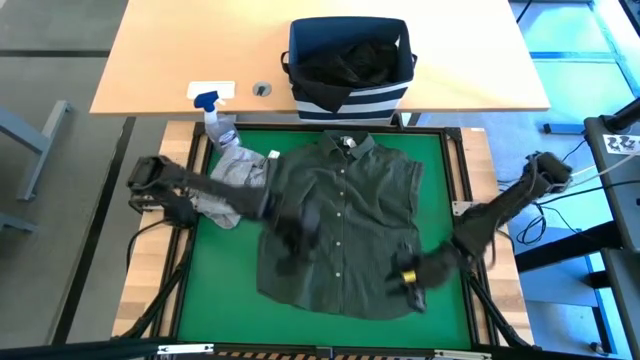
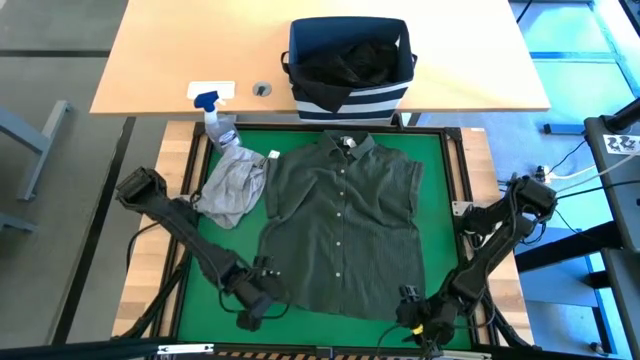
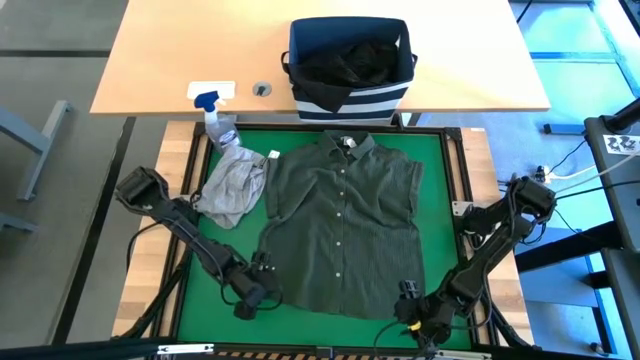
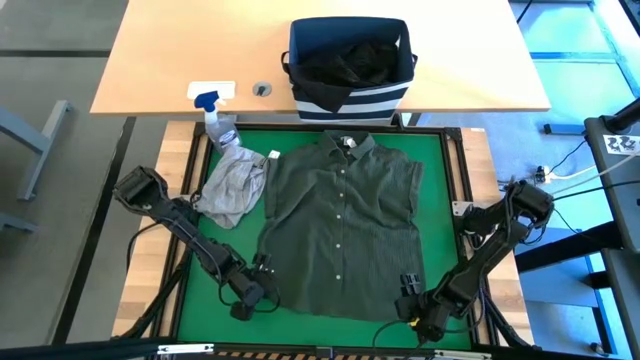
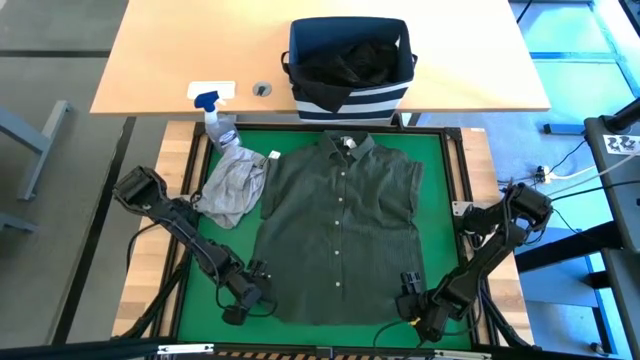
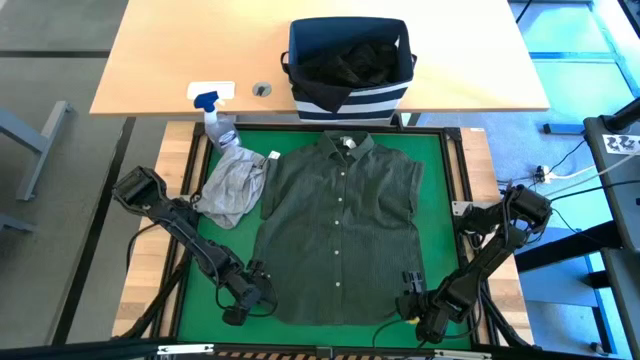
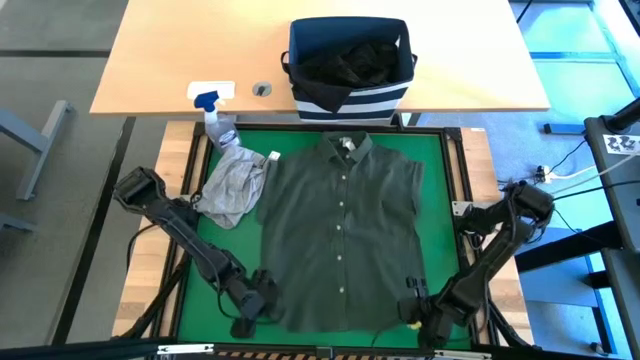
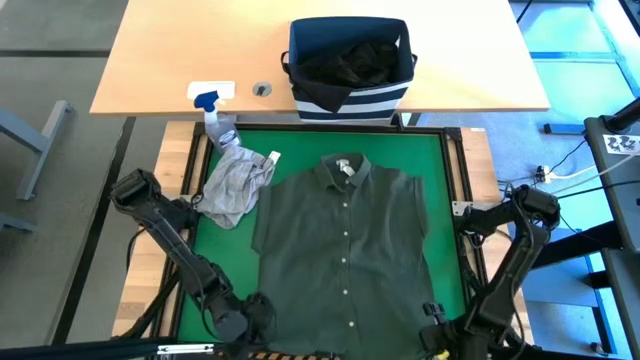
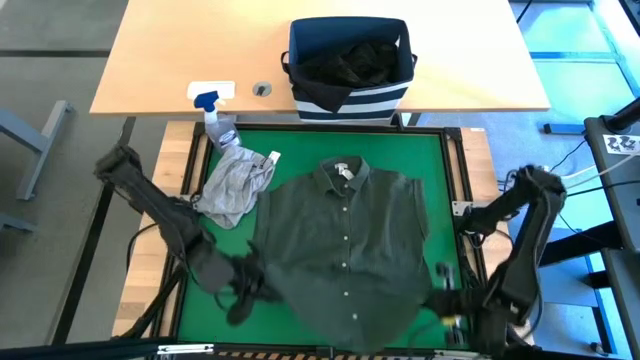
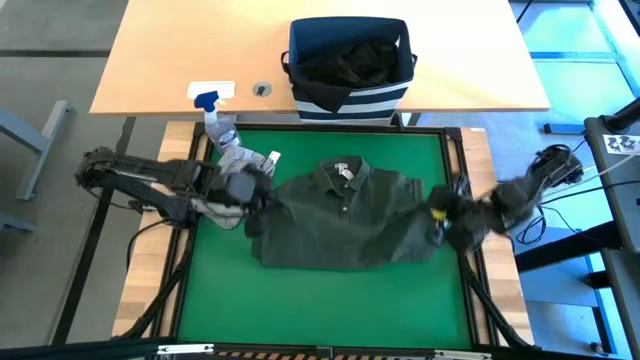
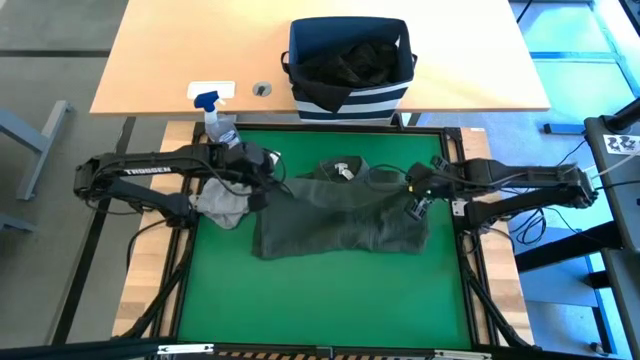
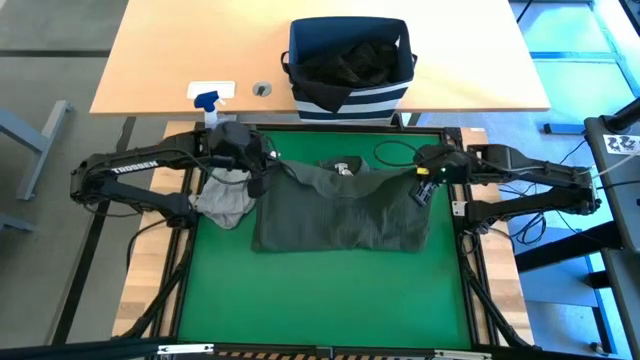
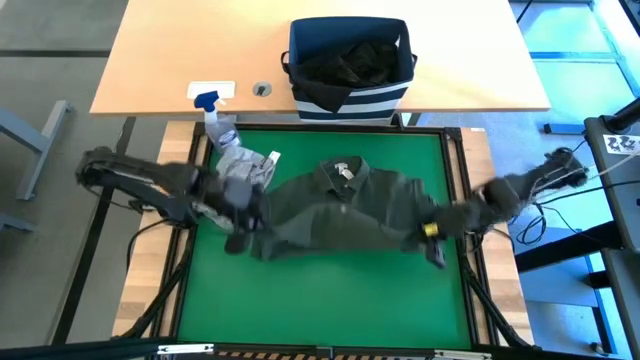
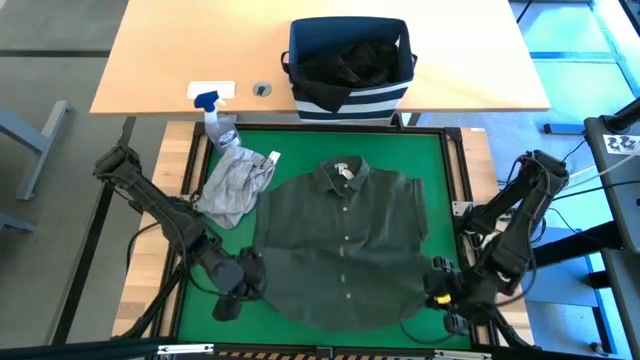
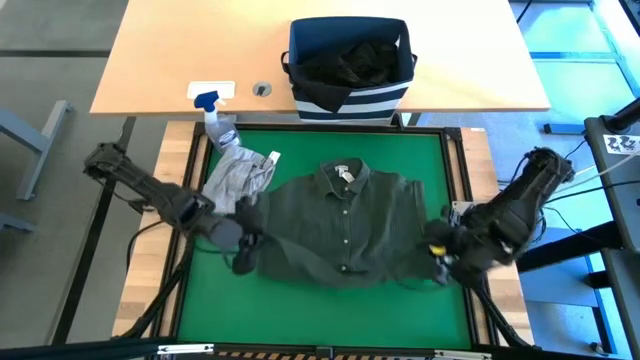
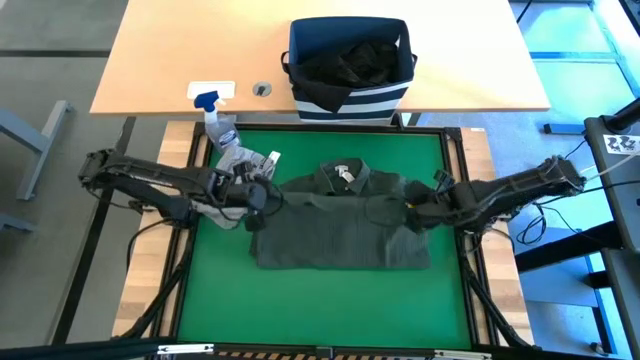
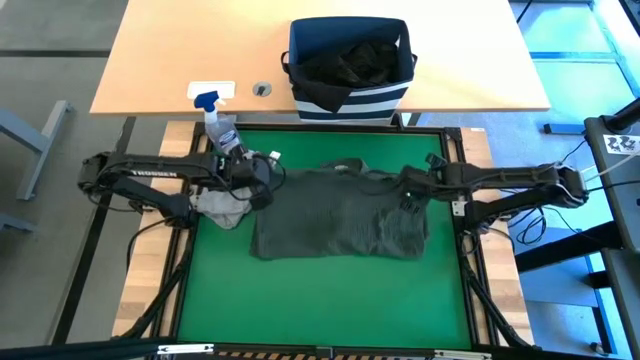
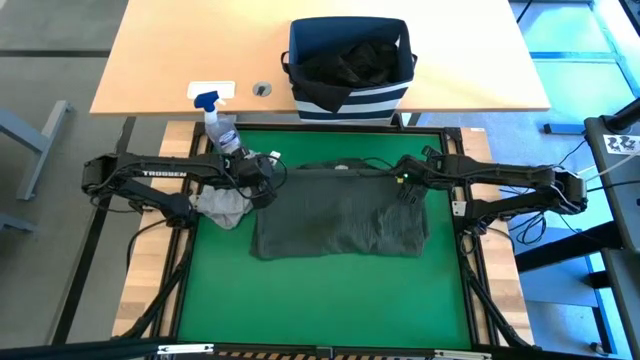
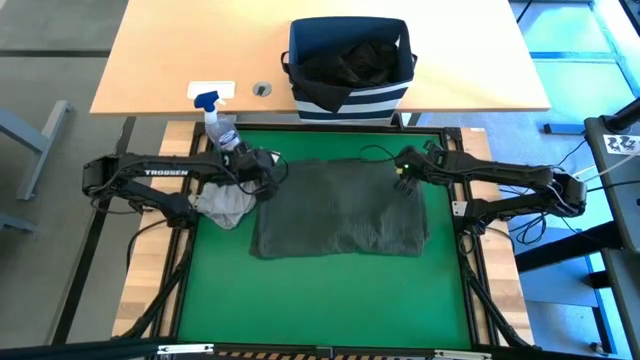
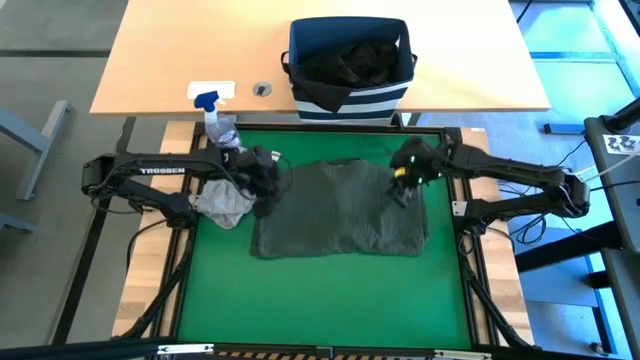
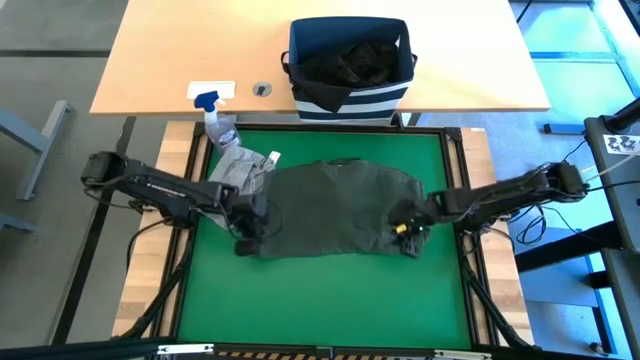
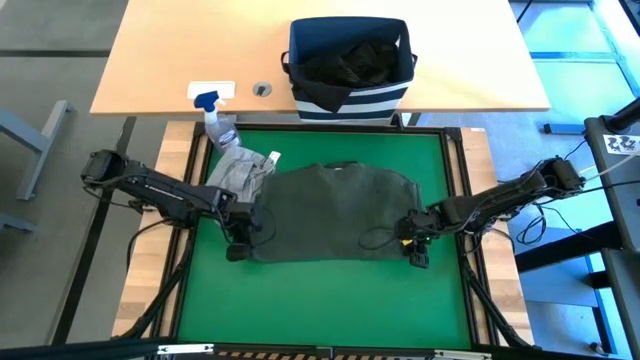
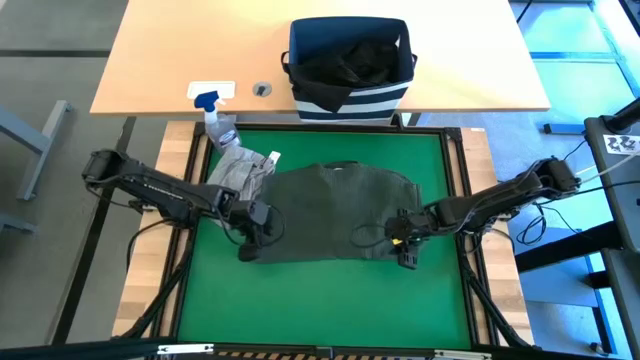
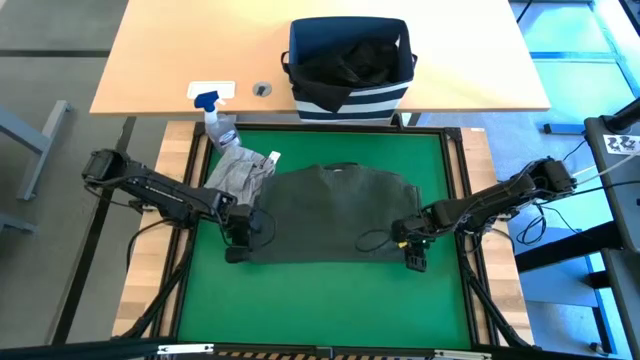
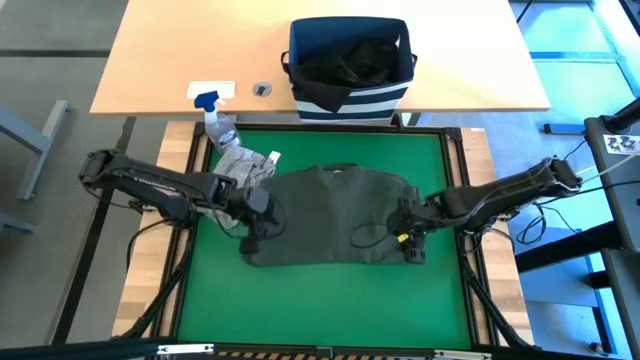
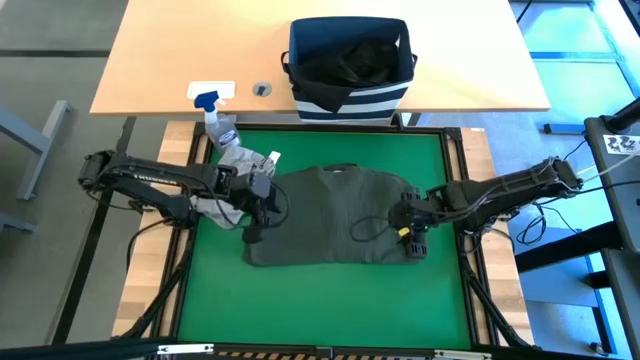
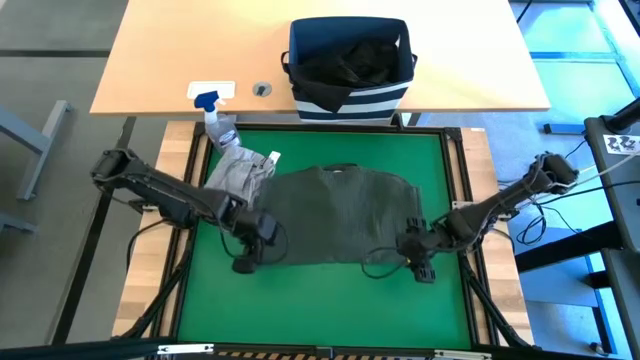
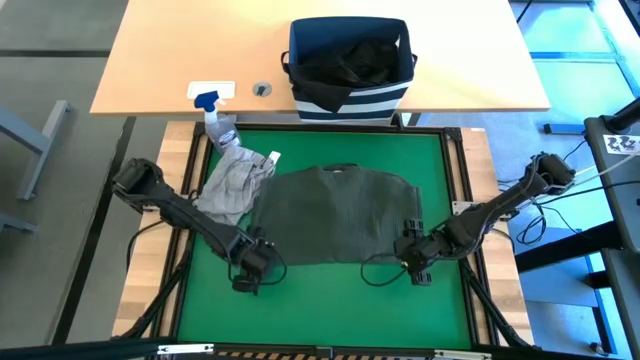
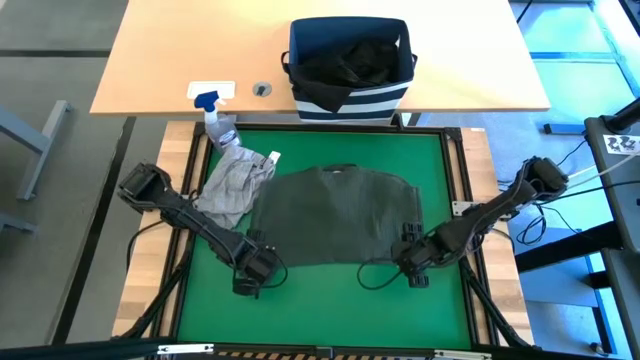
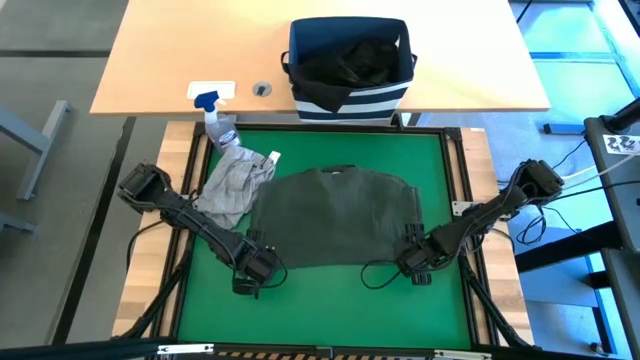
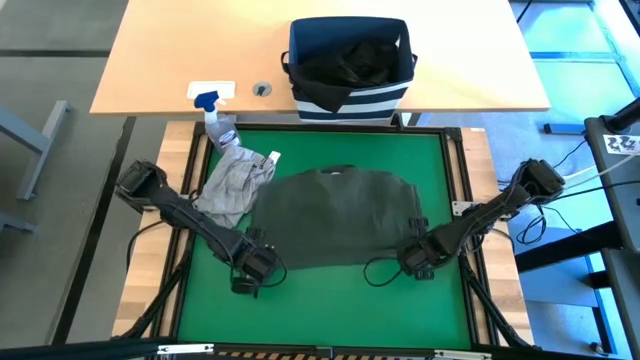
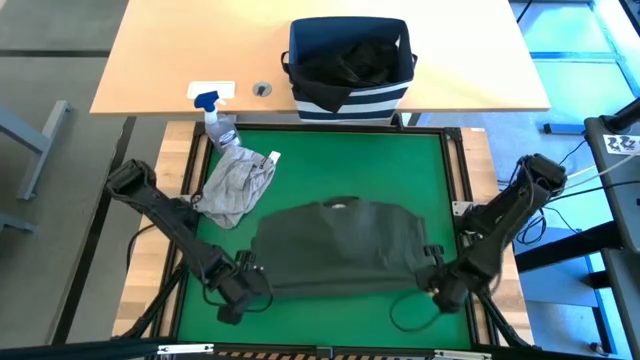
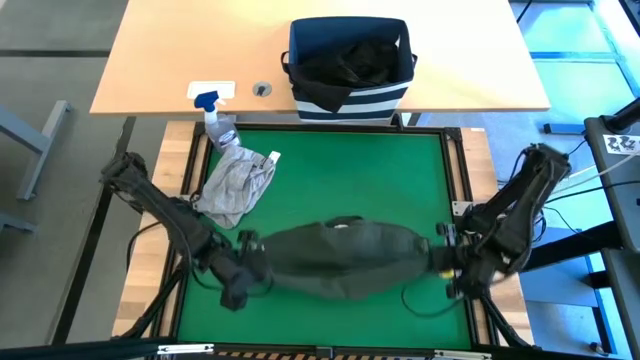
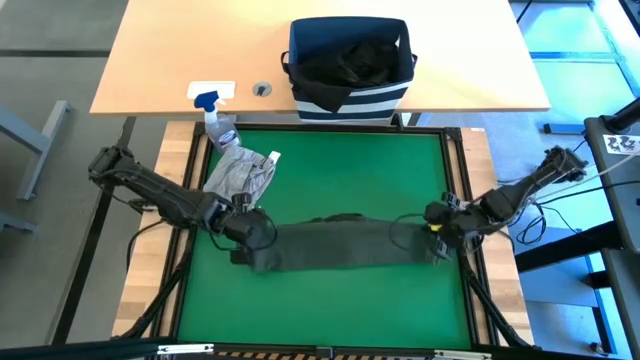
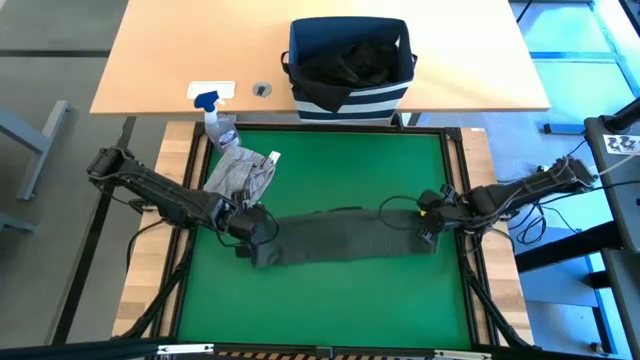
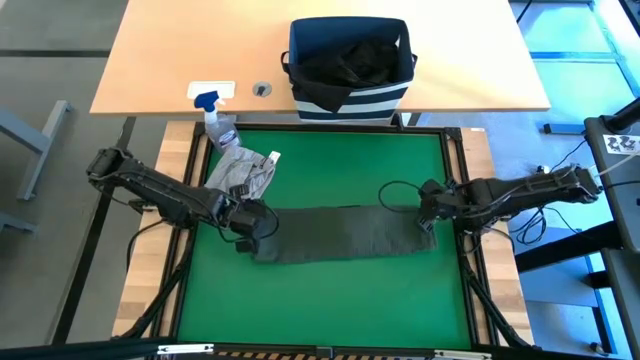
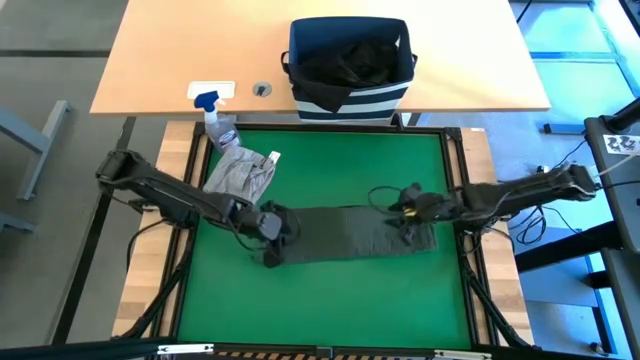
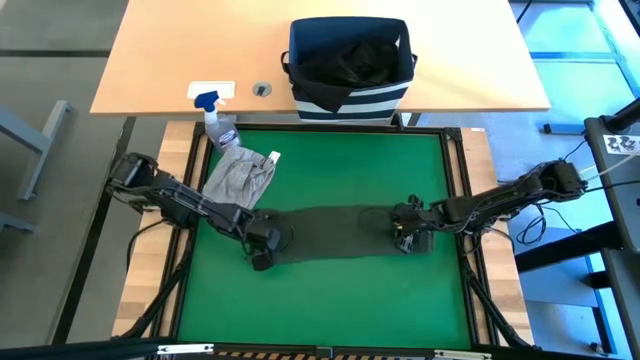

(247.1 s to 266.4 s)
Task: Fold Laundry from Bin
Fold the green shirt

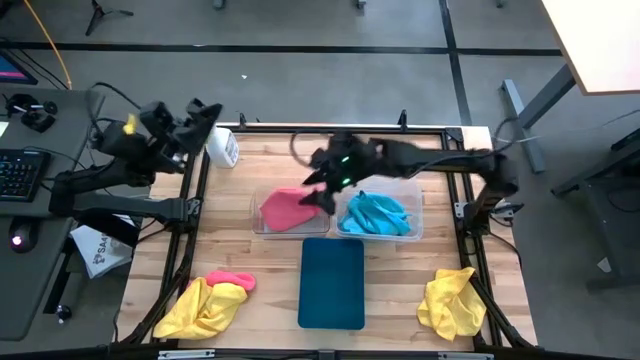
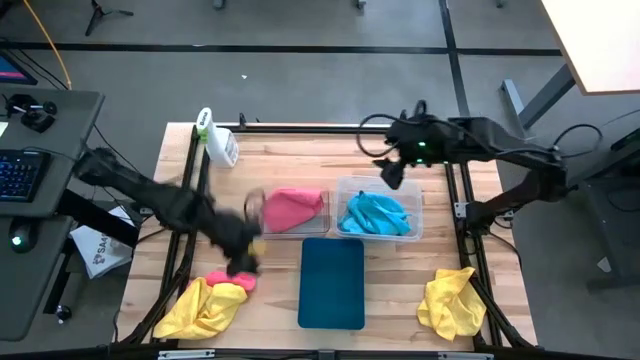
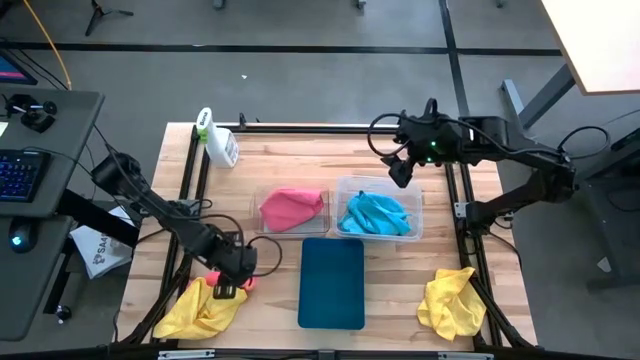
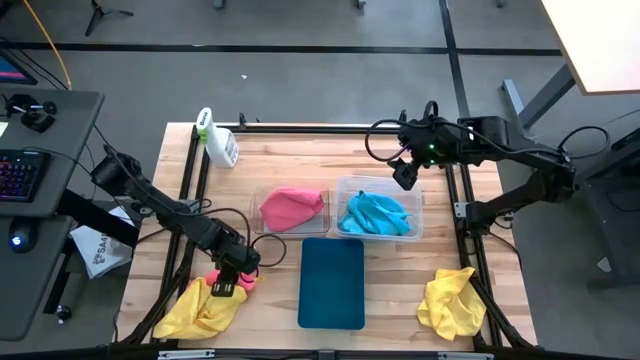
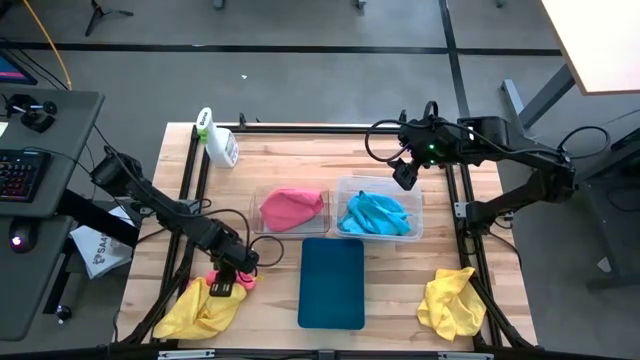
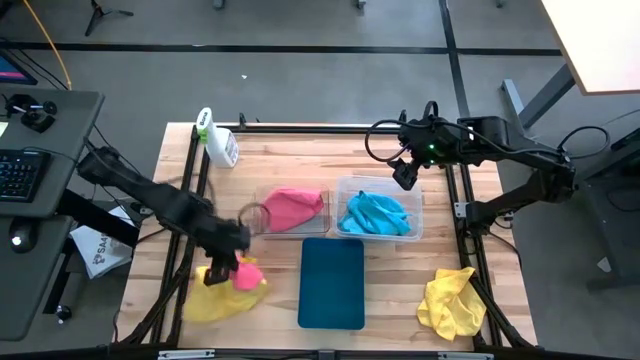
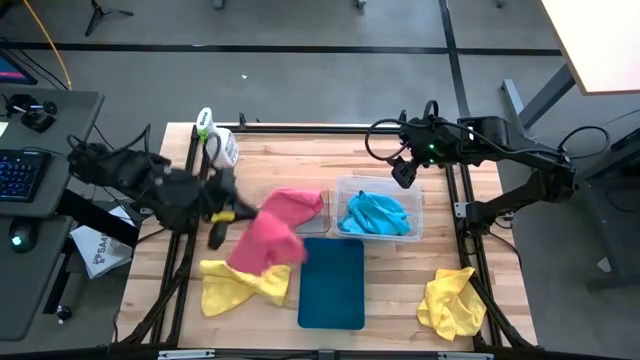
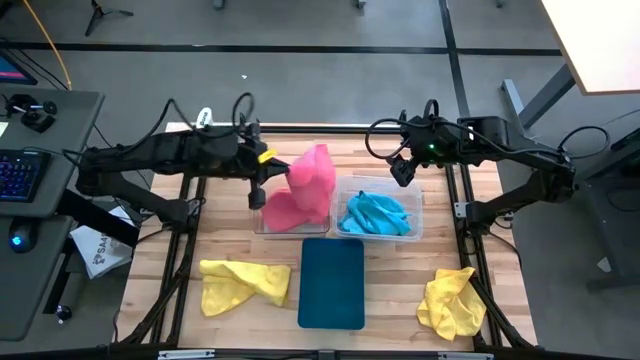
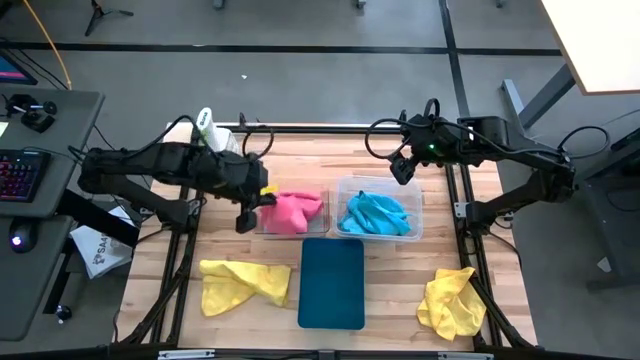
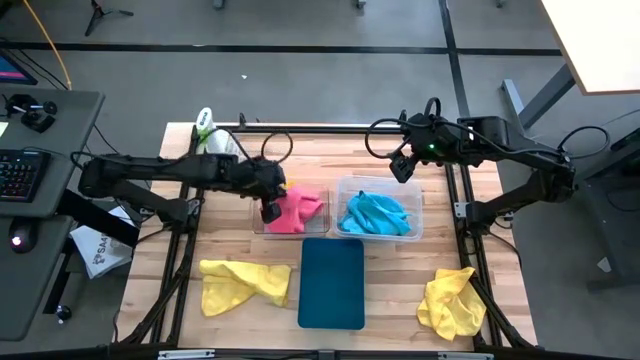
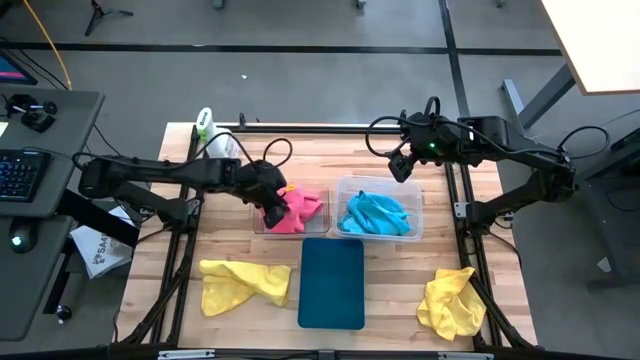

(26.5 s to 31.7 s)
Task: Sort microfiber towel by color & place in baskets
Put the pink microfiber towel into the transparent bin
